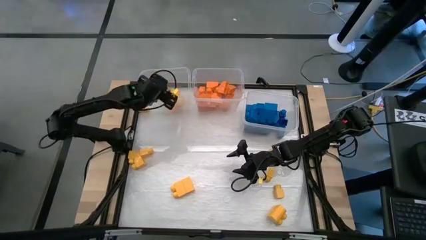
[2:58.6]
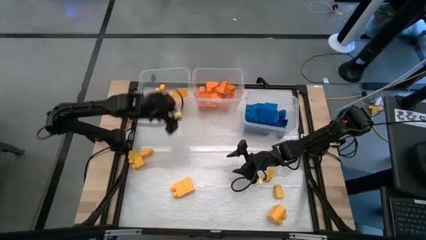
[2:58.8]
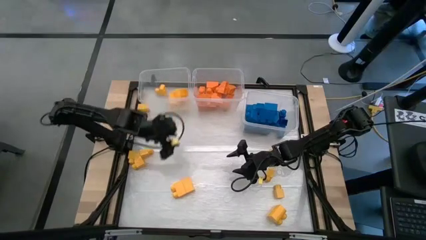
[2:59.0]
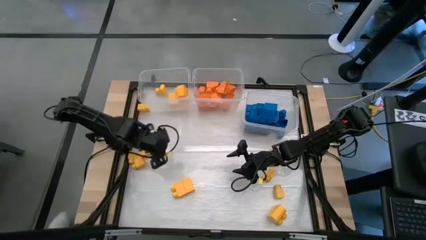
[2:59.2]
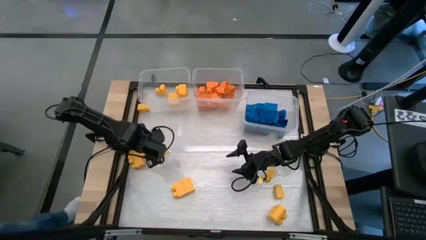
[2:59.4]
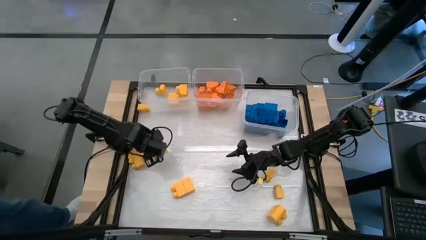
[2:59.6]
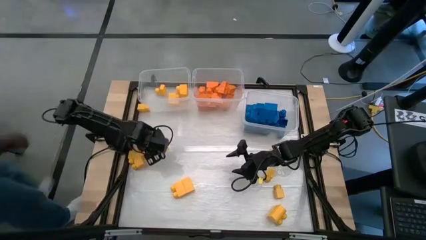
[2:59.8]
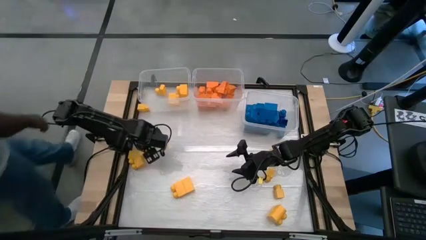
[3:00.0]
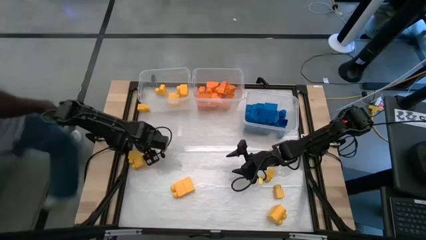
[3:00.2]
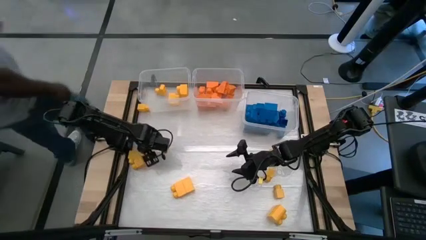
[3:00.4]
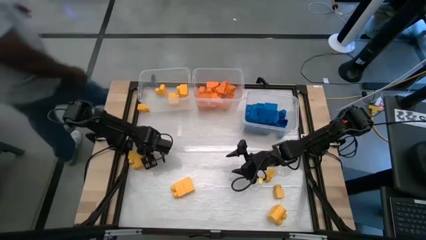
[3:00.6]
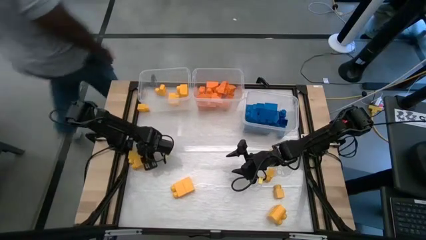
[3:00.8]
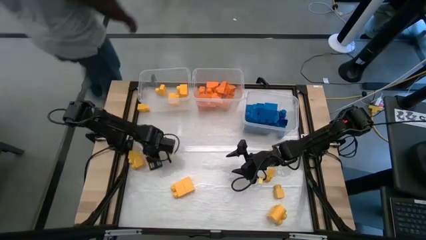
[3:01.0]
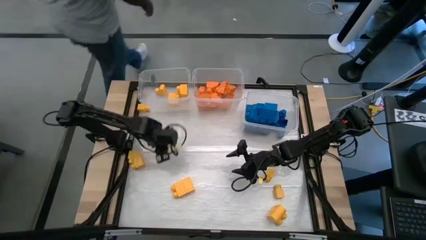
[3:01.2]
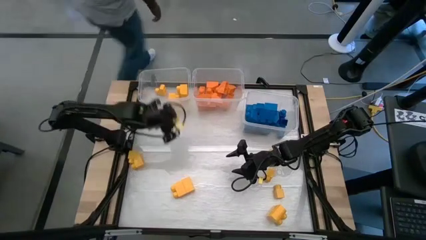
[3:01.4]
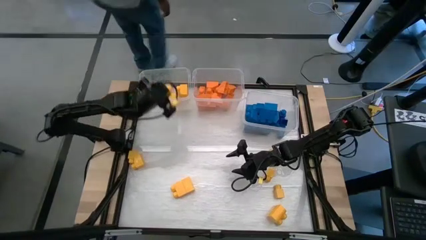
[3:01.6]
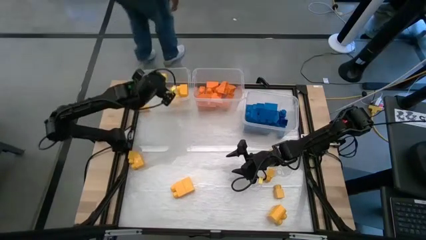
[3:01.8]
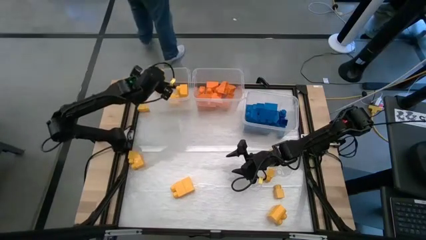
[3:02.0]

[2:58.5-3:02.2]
Task: Sort blocks
Put the yellow game piece into the left transparent bin

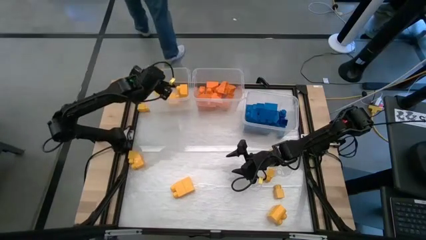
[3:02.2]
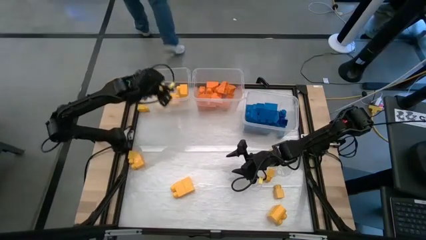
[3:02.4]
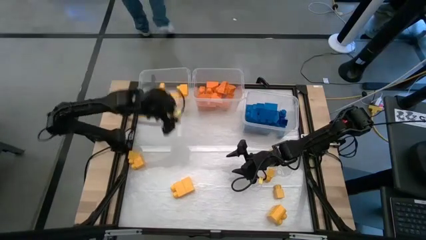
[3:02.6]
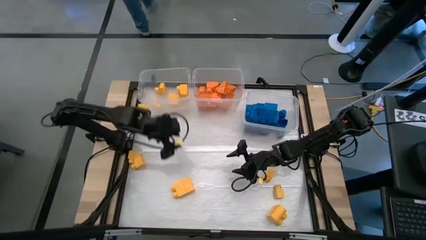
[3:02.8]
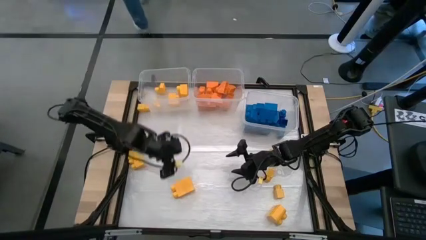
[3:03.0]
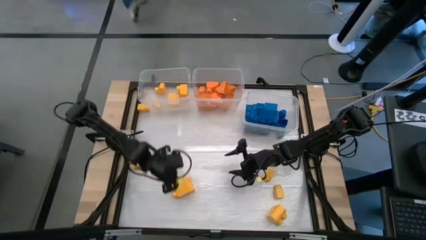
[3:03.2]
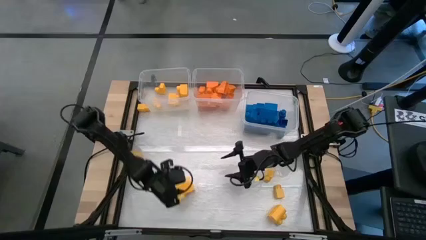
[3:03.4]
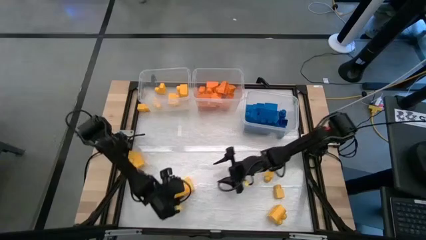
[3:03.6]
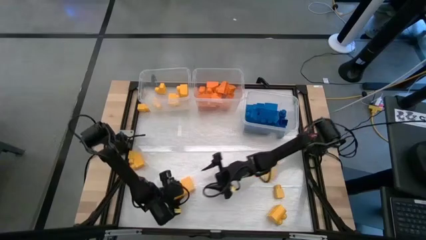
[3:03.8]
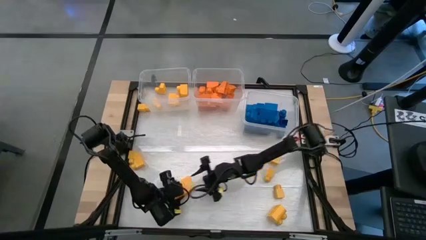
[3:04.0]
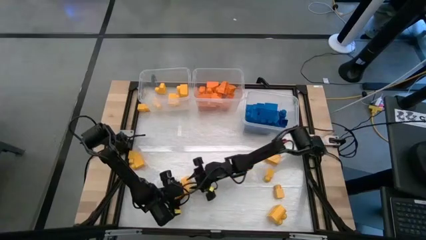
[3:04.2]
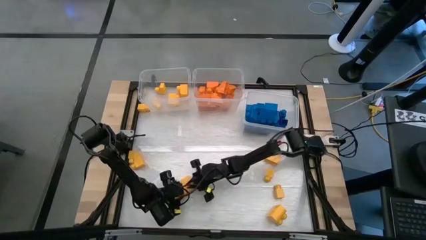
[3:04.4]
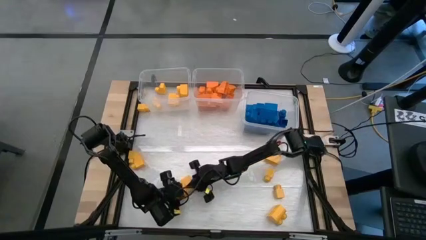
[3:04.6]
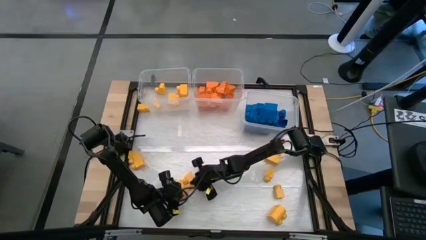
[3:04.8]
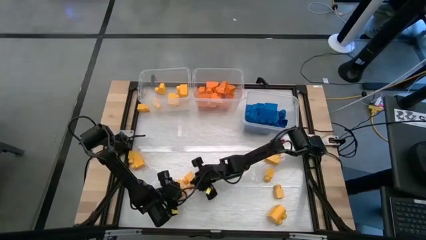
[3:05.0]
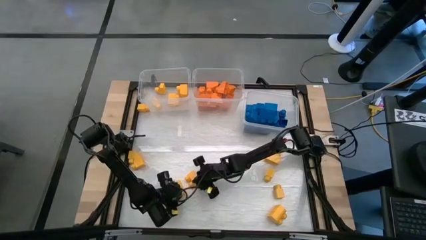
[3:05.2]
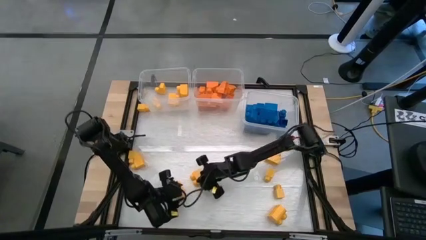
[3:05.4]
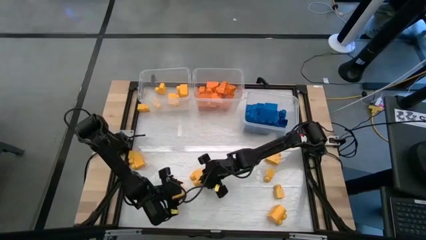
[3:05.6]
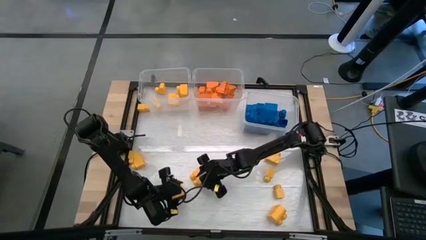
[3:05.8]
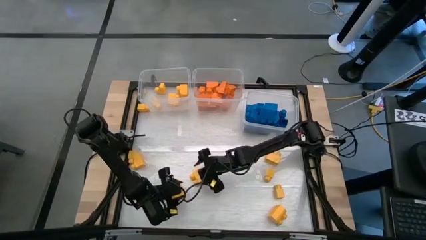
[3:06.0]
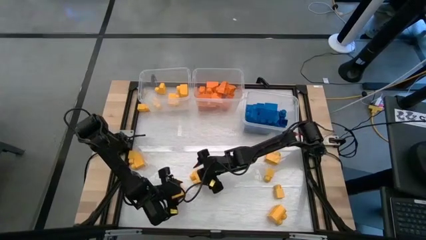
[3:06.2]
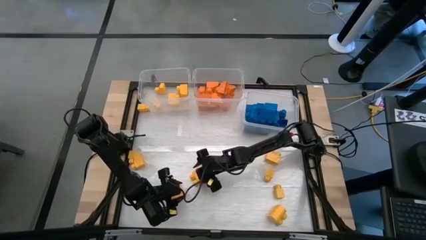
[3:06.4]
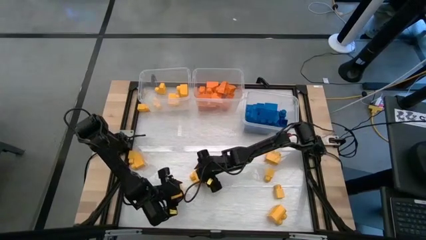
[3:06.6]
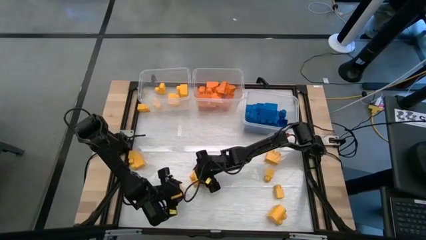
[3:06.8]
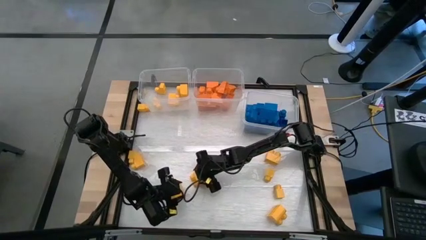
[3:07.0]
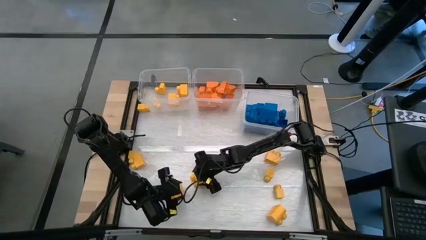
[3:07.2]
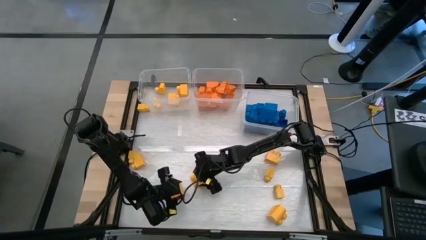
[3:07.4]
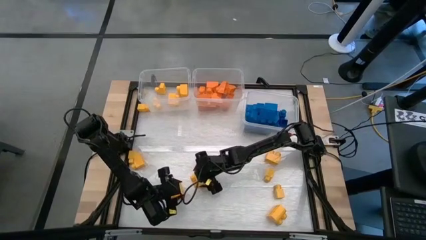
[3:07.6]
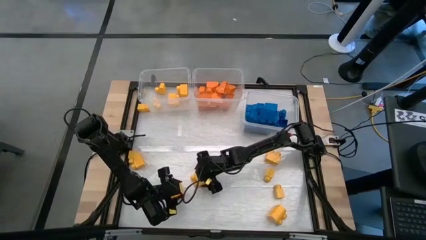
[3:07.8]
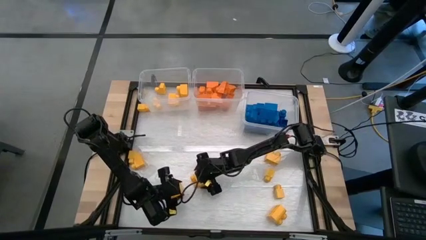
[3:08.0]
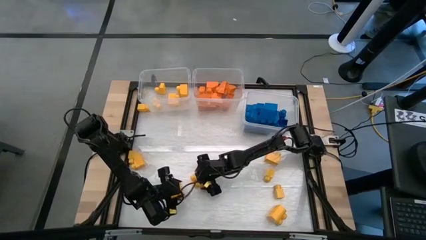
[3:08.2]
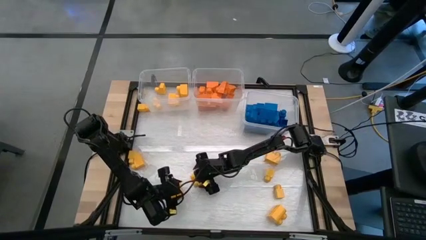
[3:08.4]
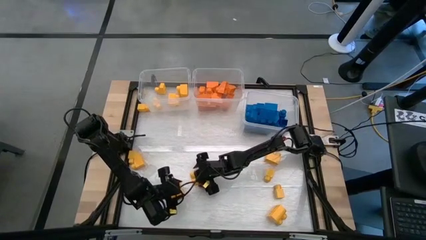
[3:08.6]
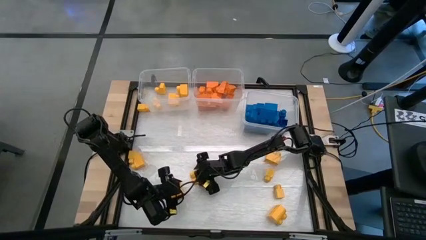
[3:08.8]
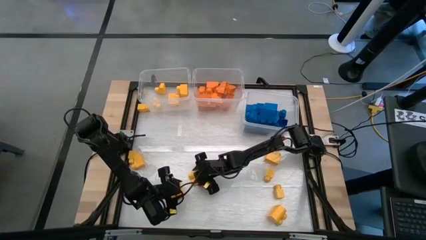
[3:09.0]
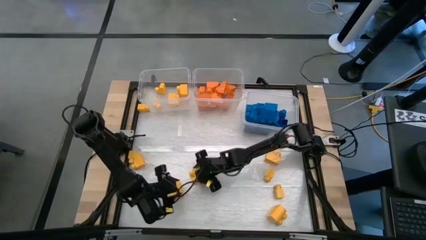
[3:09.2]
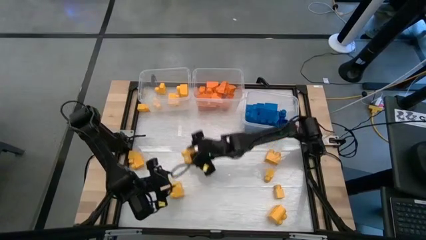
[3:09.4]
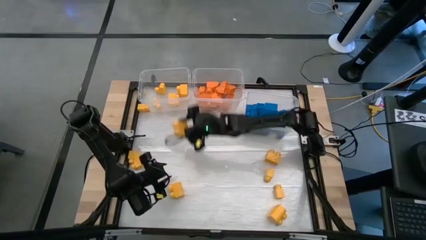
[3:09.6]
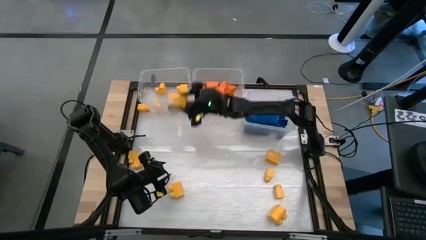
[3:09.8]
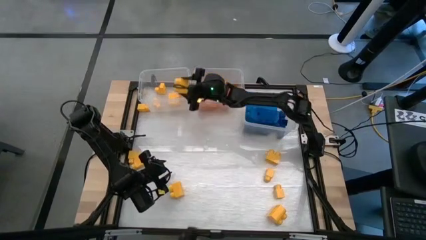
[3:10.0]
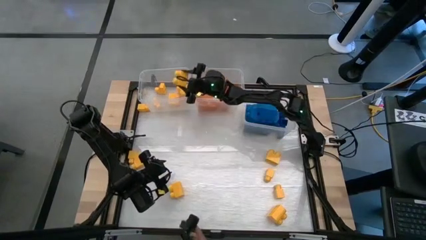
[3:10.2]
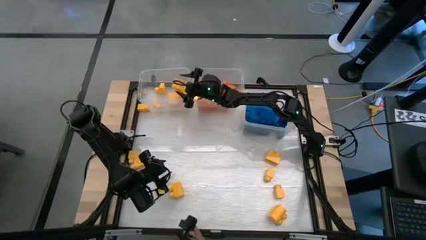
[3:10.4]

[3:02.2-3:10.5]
Put the yellow game piece into the left transparent bin

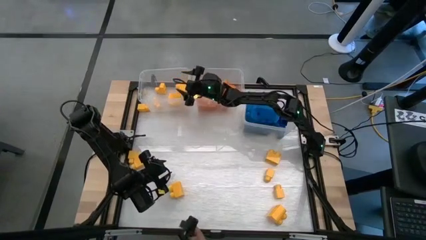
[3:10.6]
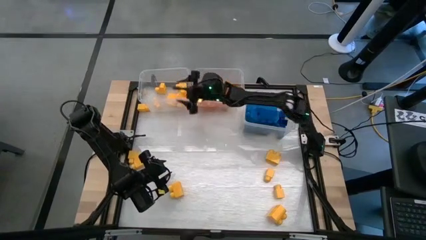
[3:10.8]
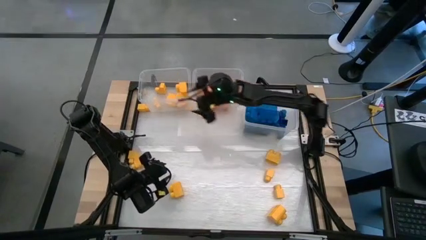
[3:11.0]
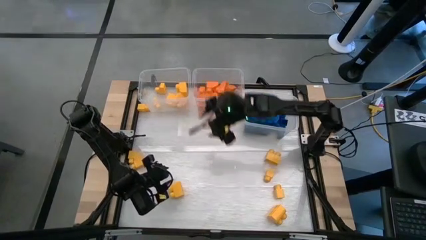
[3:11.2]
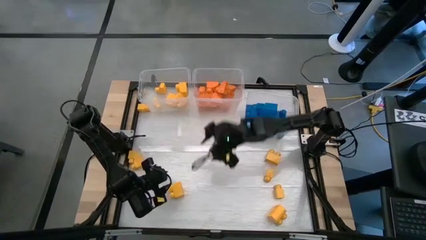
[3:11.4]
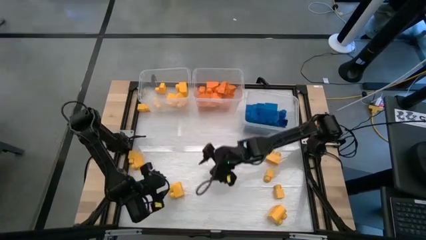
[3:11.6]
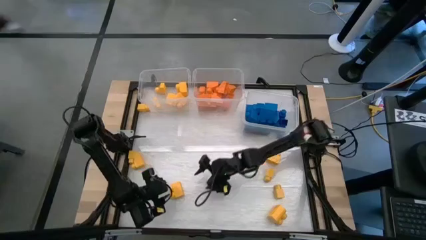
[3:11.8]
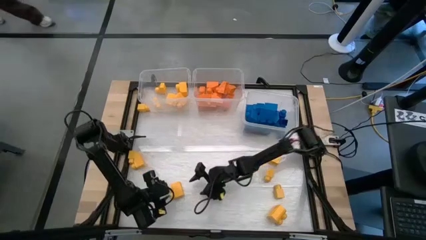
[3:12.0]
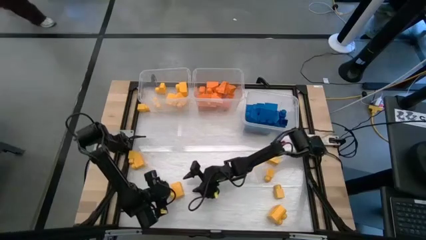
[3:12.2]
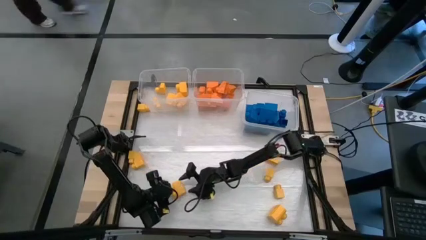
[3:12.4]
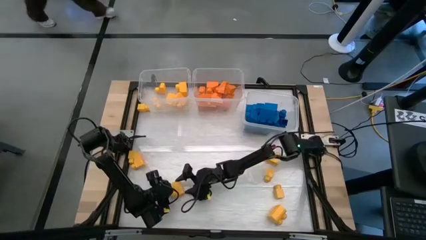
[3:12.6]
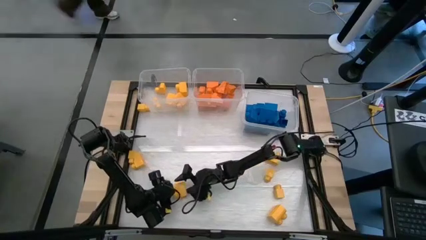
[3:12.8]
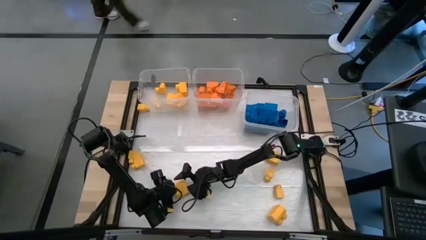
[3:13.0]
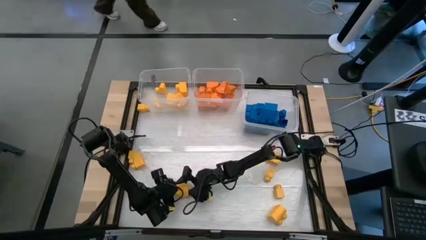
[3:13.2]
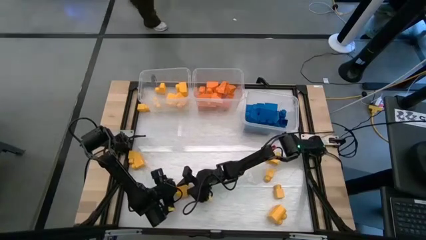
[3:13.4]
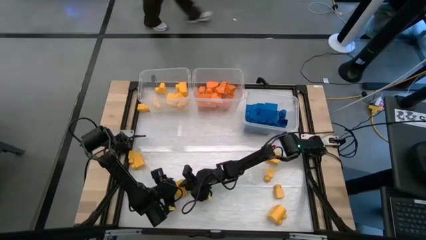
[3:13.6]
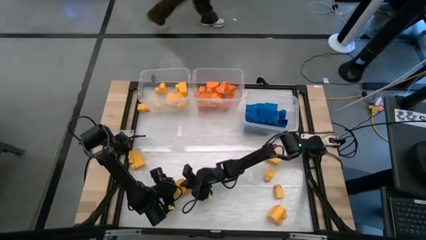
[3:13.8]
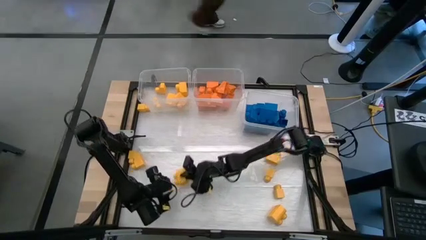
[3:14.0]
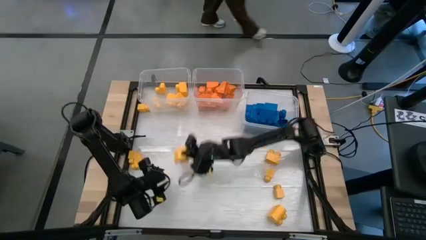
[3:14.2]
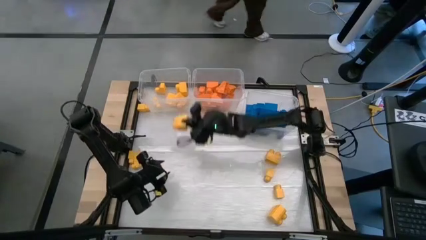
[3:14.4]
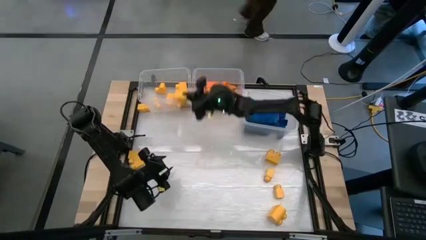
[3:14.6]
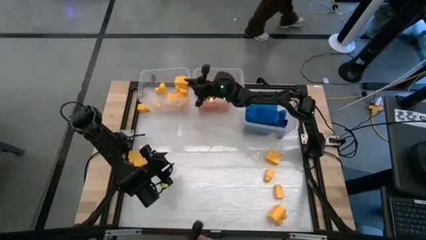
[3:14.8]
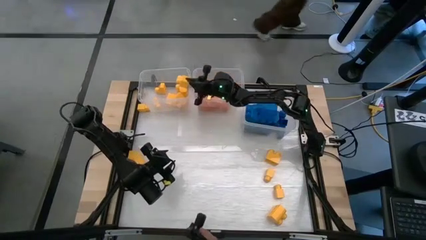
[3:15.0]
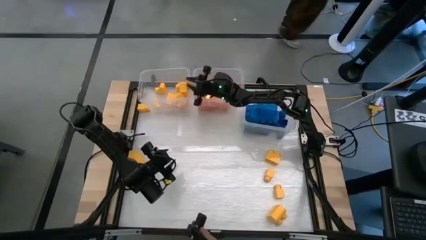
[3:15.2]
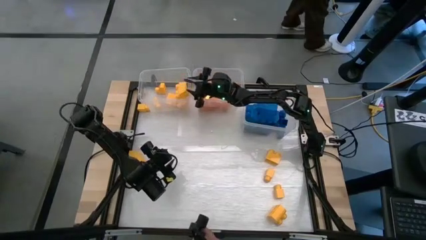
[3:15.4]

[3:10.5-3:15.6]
Put the yellow game piece into the left transparent bin
